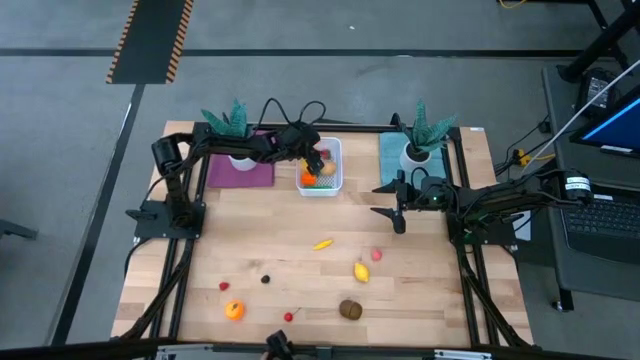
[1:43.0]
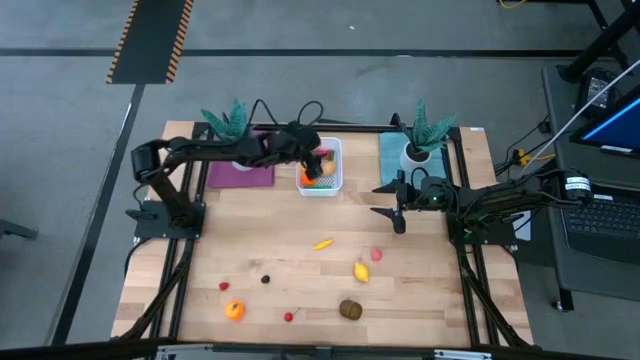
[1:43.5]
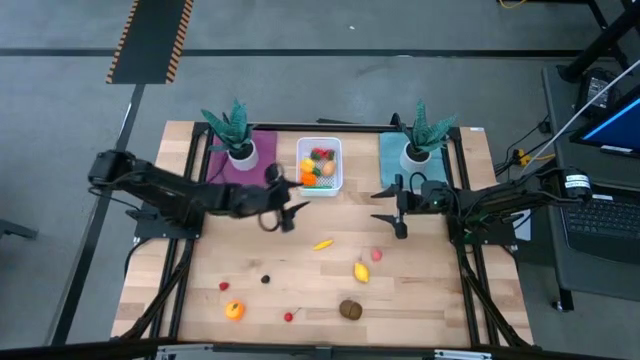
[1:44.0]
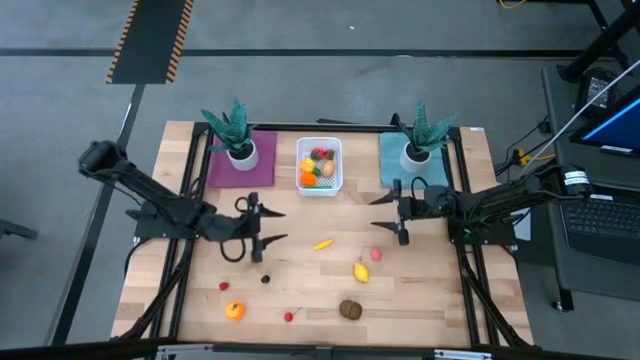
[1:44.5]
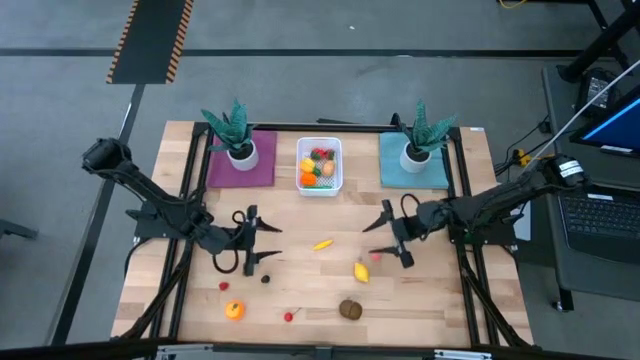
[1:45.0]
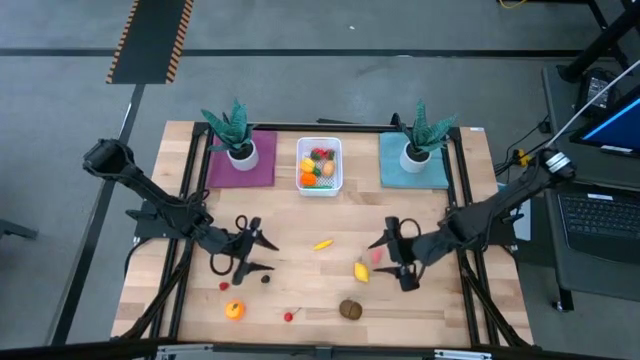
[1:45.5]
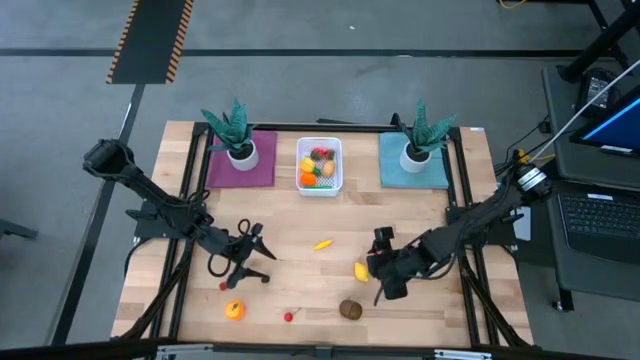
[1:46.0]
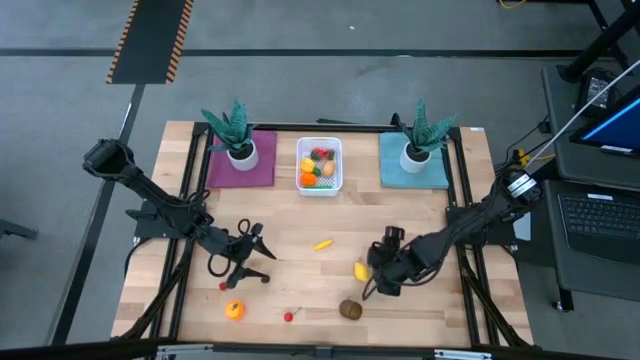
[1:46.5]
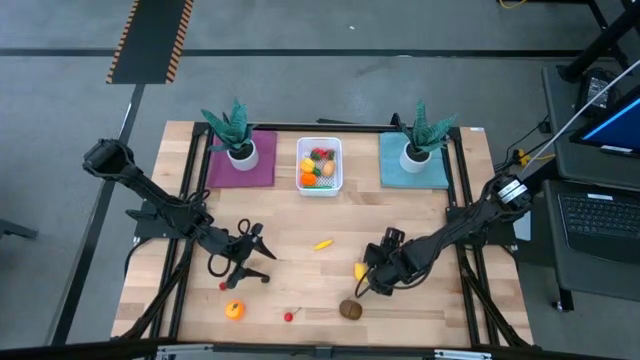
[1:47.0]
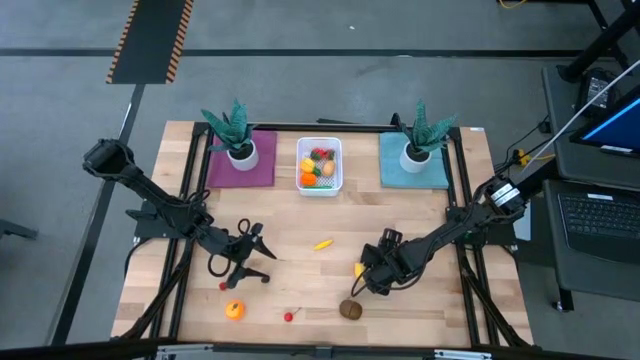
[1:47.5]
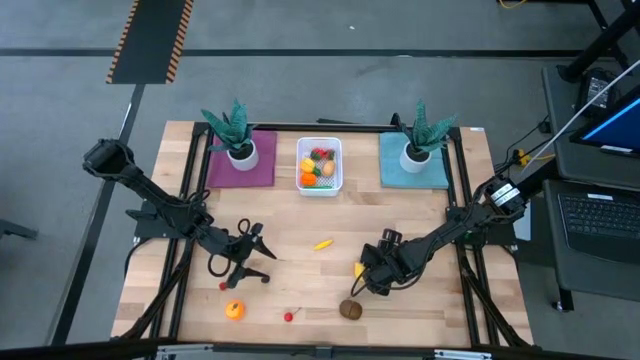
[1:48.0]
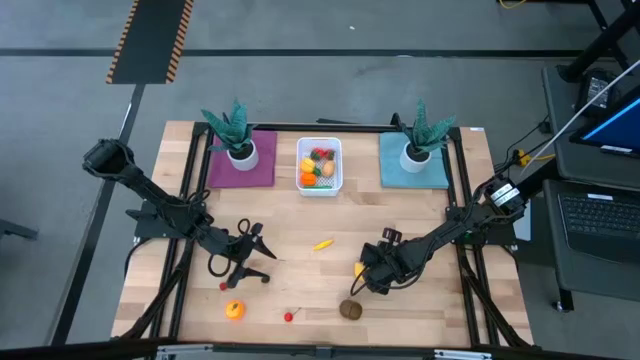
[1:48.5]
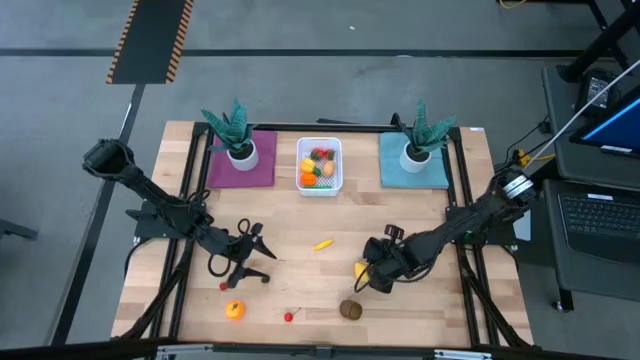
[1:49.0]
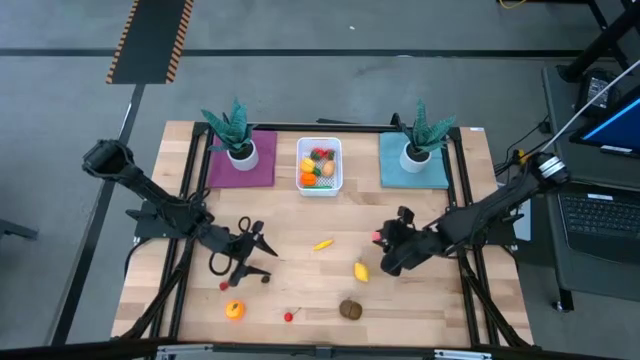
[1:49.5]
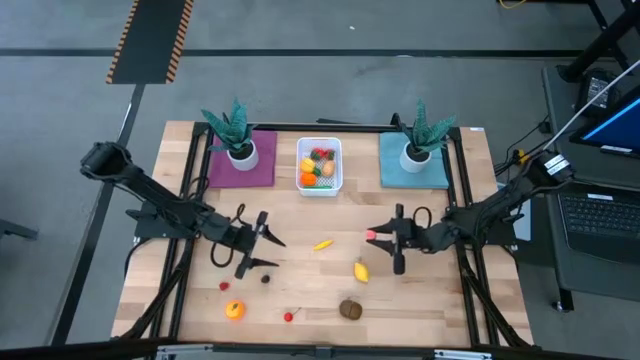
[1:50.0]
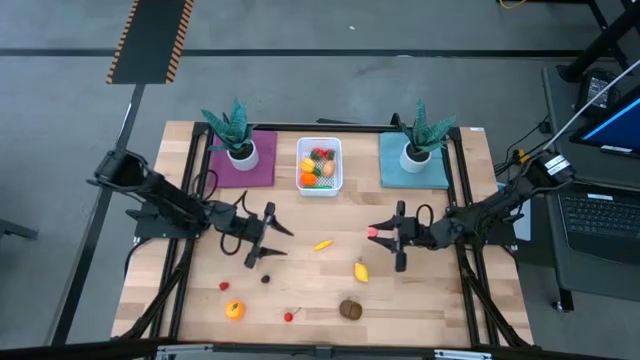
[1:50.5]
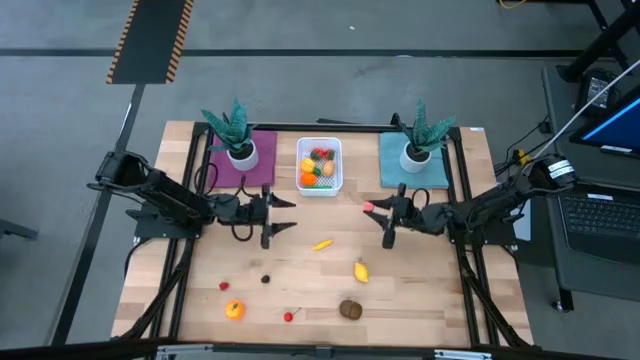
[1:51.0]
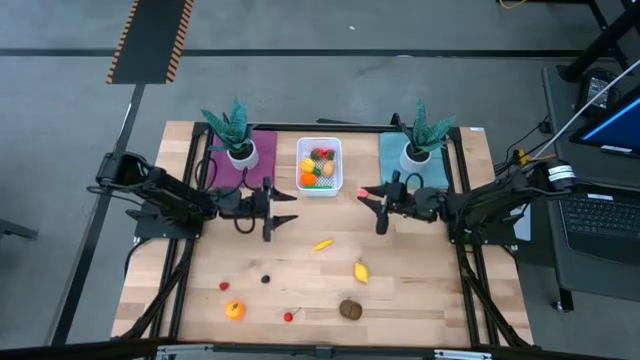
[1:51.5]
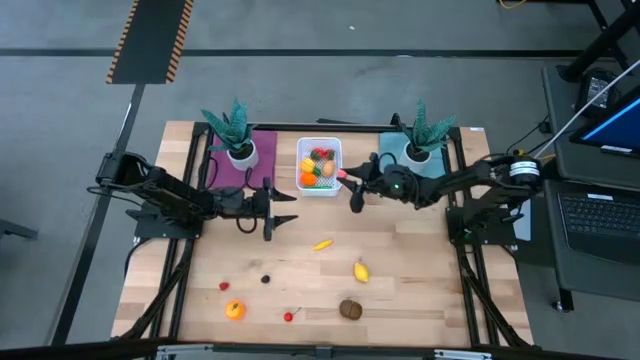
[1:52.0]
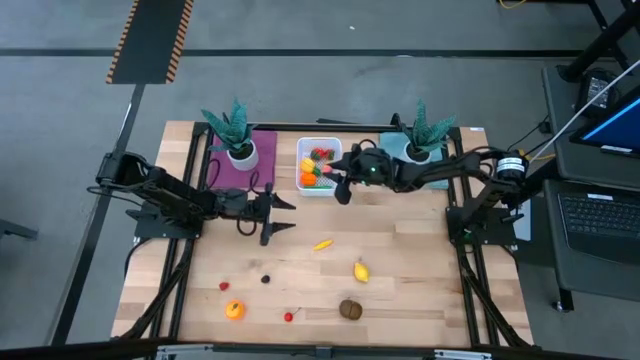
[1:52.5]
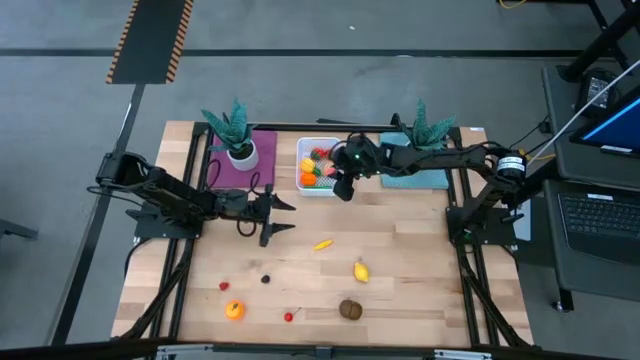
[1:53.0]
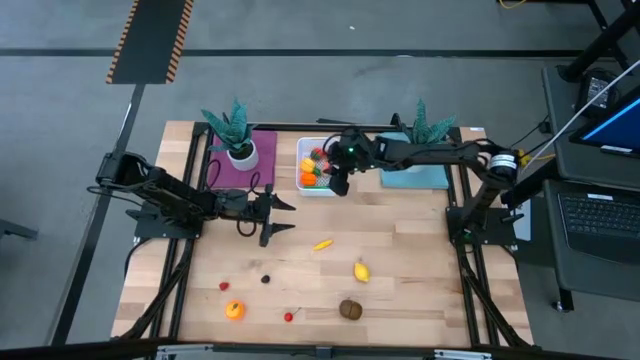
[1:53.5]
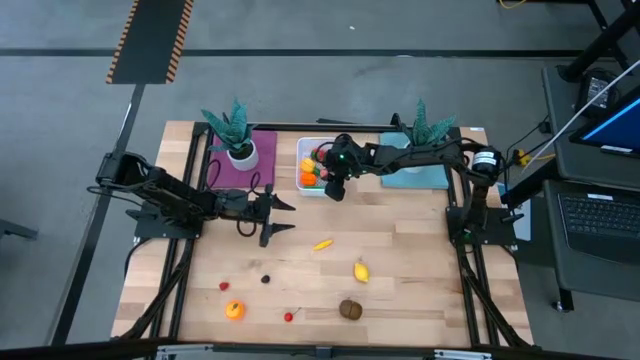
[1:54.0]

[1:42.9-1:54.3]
Task: Pick and placing Produce into tupperware
Put the pink peach into the white bin

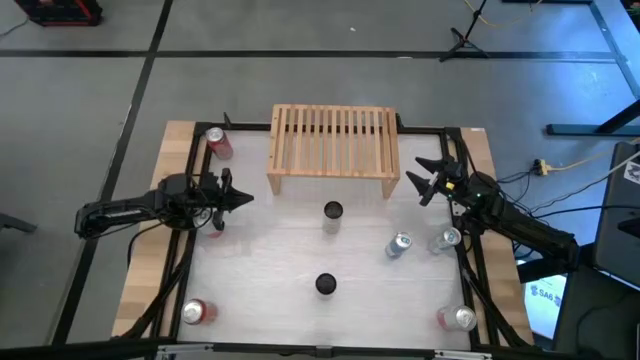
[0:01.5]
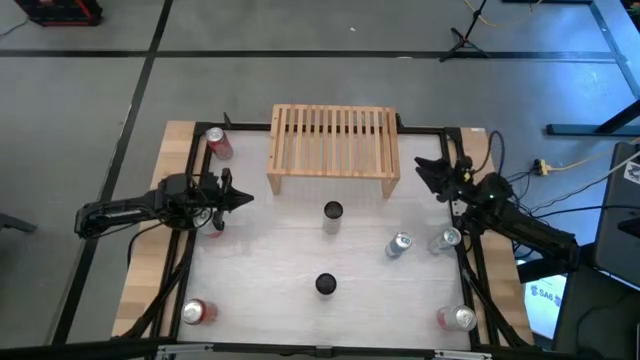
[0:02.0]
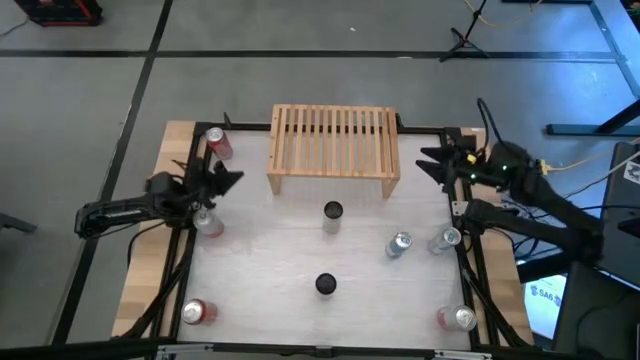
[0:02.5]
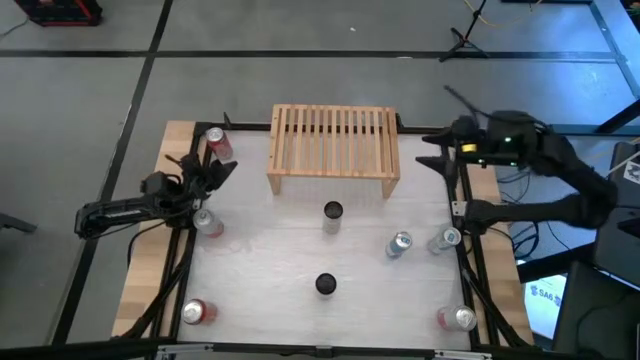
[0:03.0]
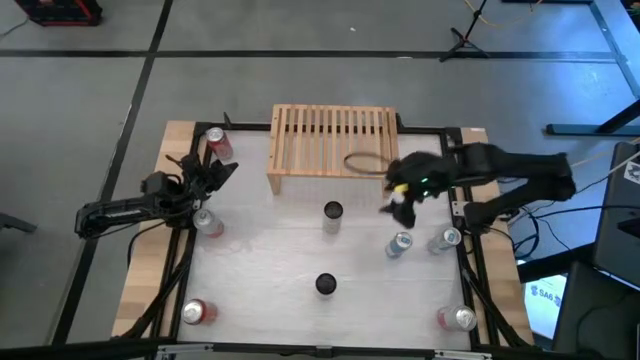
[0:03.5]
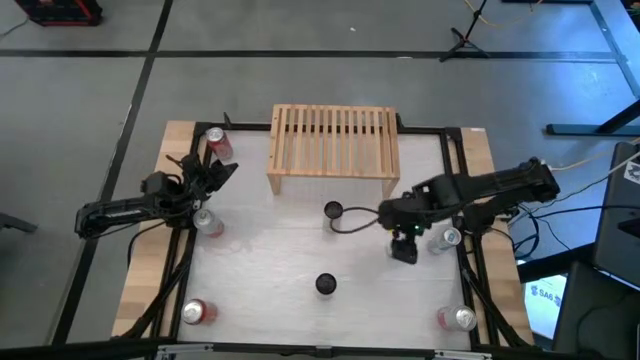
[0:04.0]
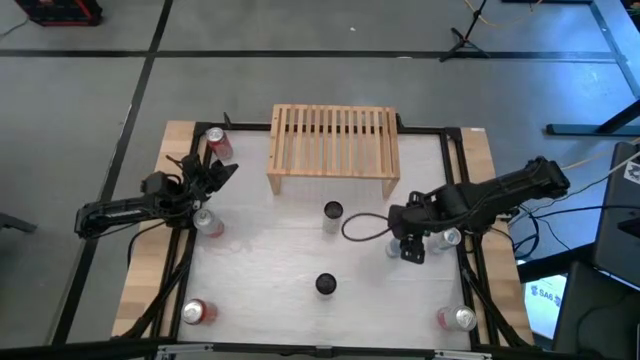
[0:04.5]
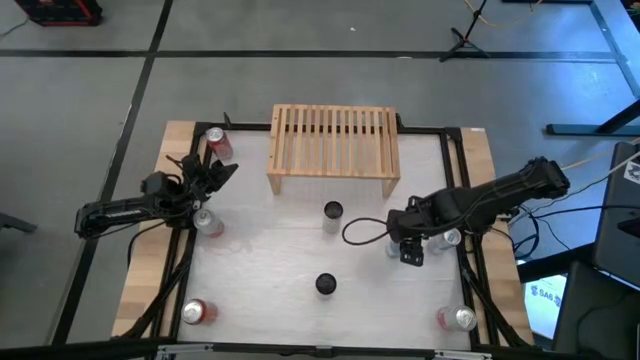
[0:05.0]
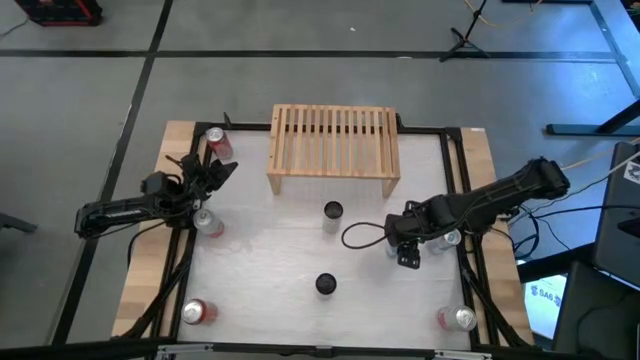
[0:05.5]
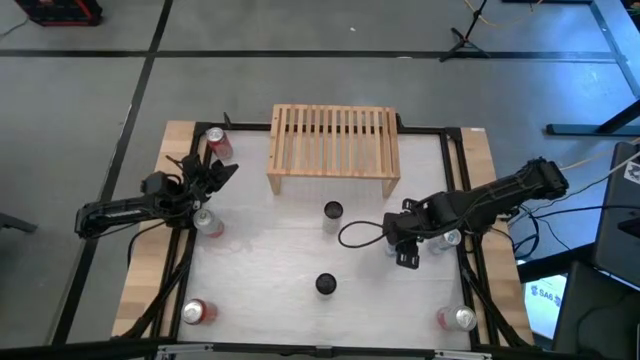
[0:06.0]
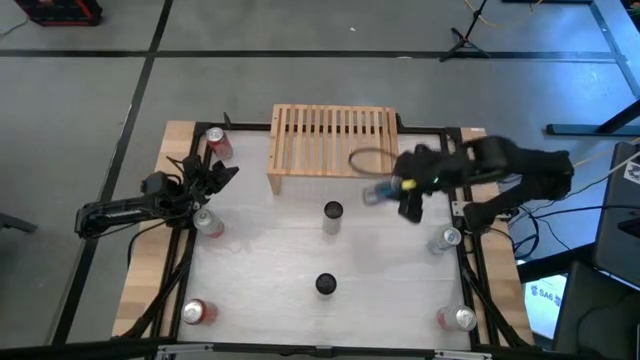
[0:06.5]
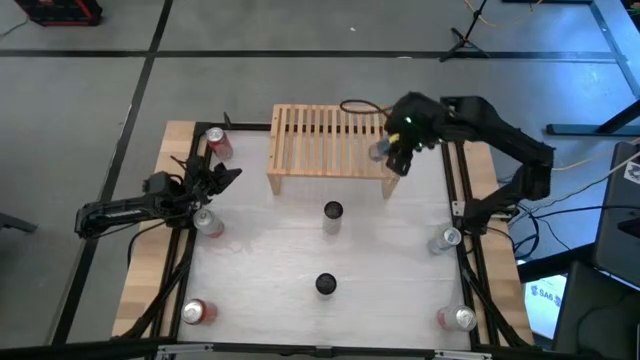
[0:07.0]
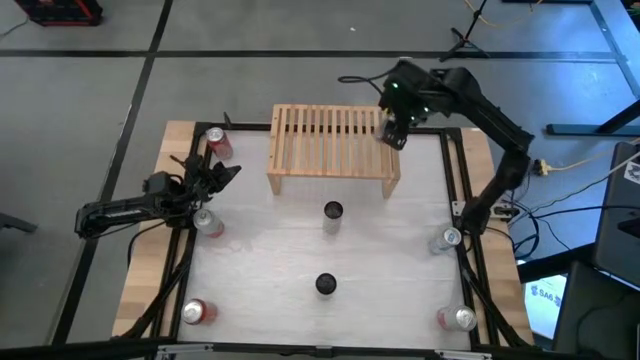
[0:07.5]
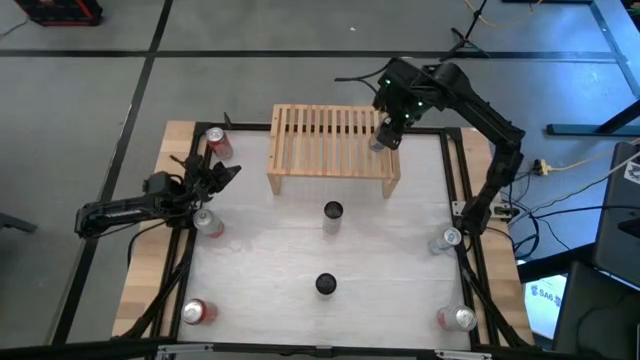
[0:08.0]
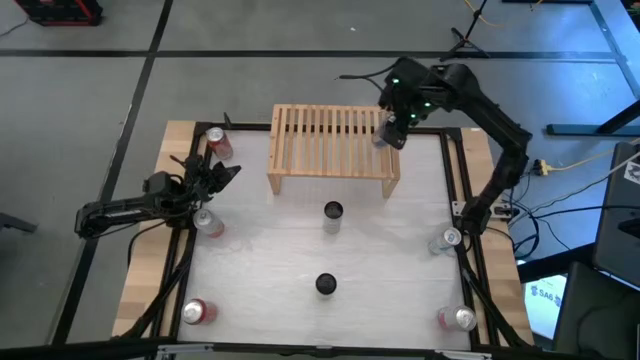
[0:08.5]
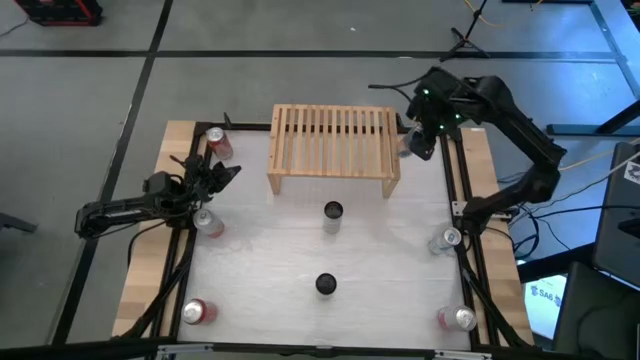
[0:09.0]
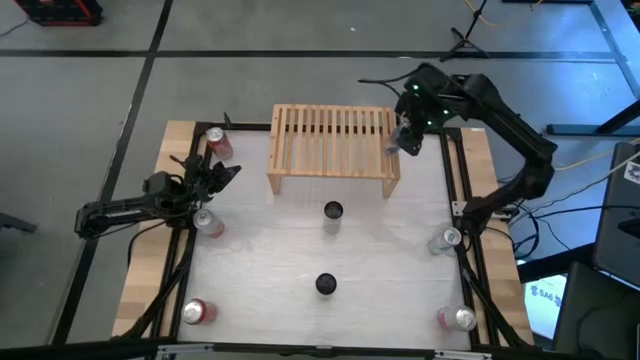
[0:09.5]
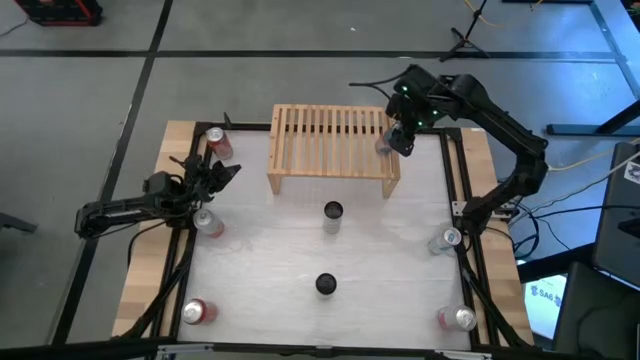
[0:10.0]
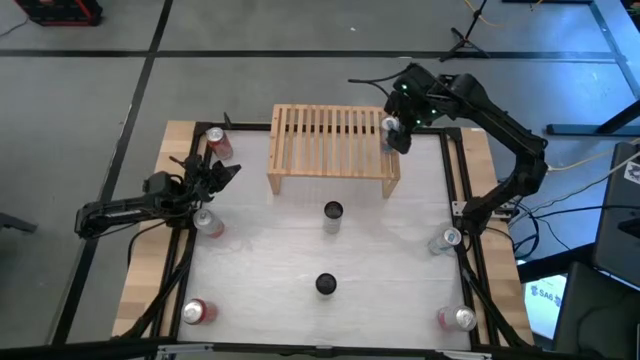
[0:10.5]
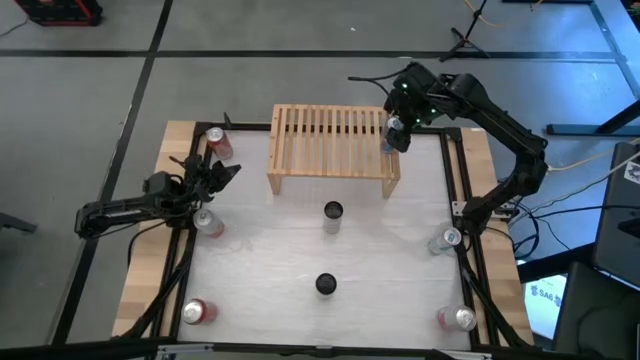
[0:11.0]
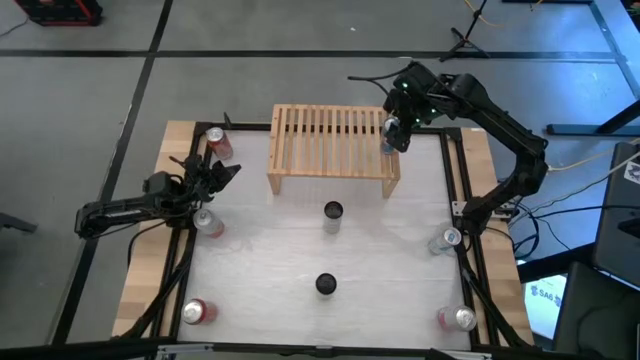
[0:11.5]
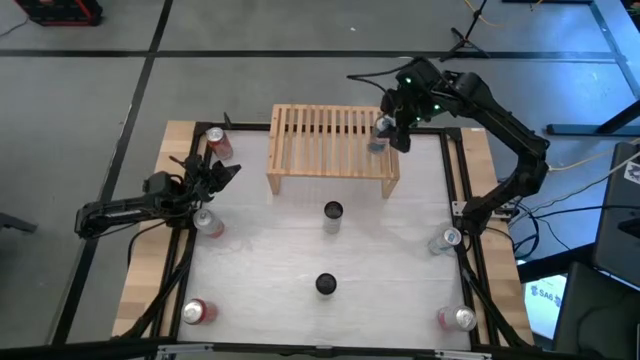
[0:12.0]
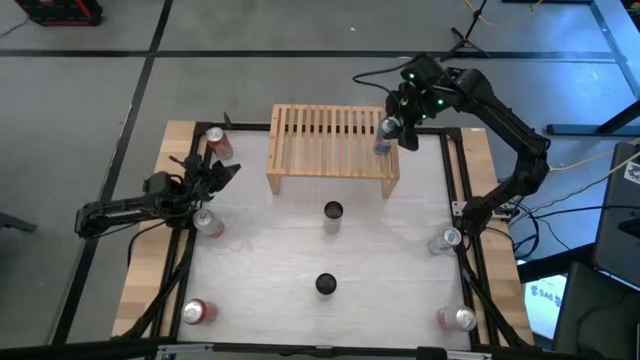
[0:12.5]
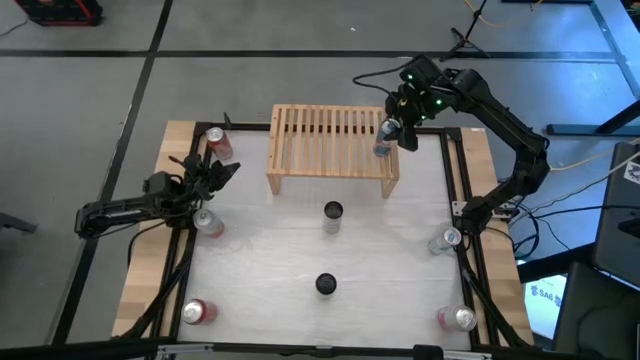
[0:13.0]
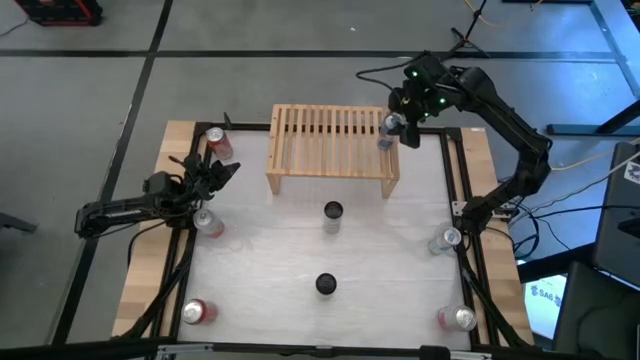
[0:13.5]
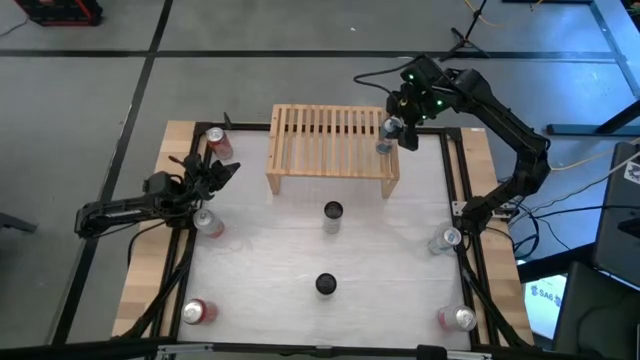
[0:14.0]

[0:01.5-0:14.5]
Task: Place canned beverage on shelf
Put the left blue soda can on the shelf
